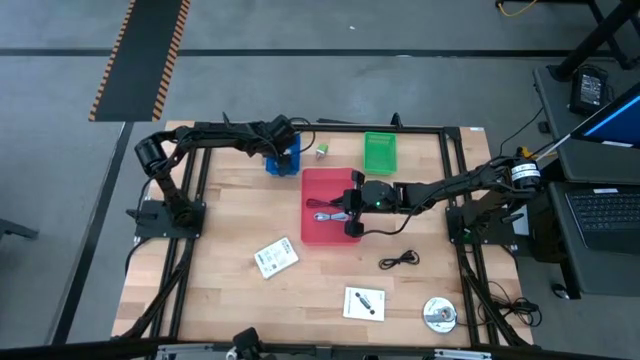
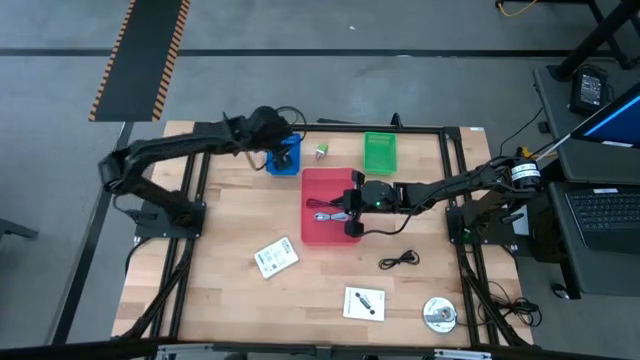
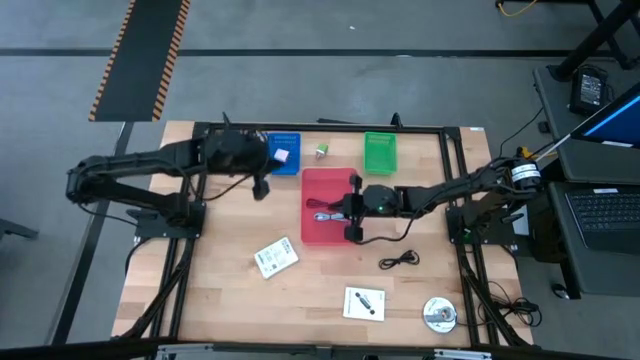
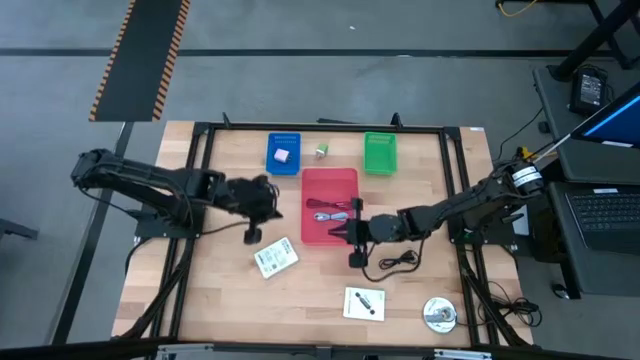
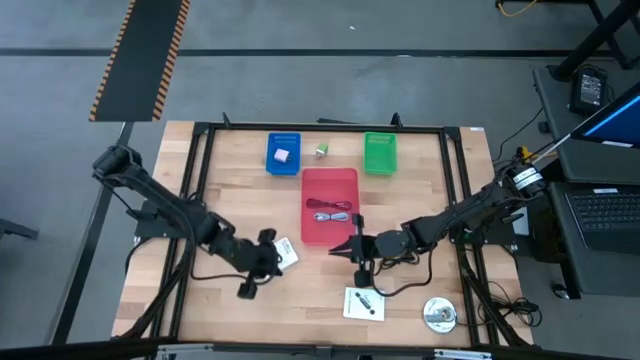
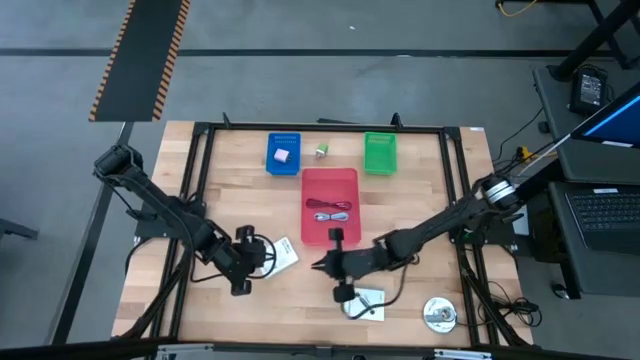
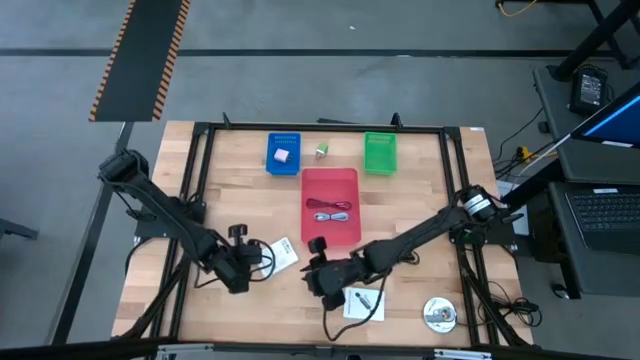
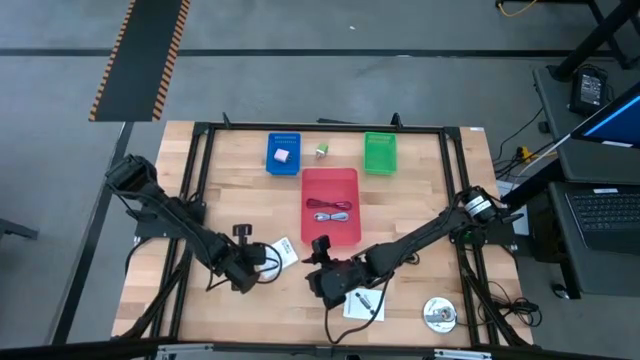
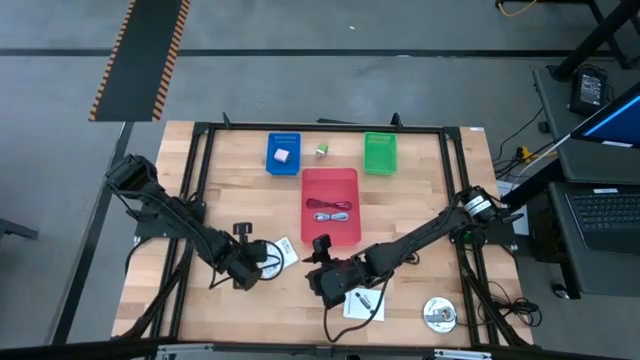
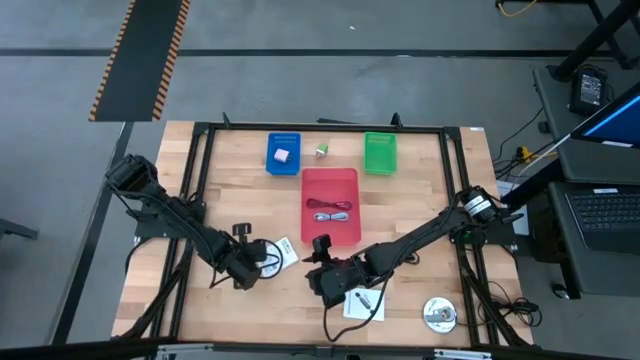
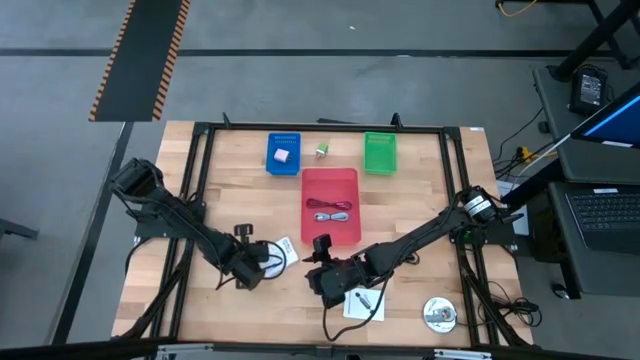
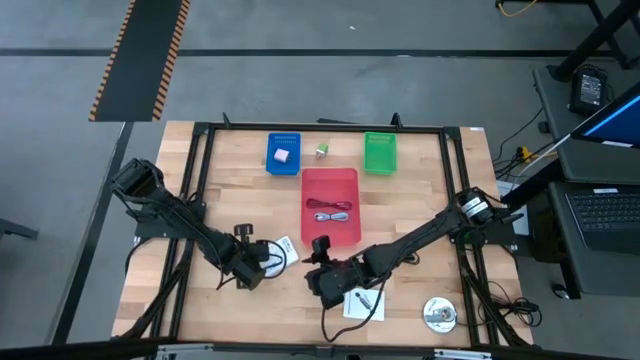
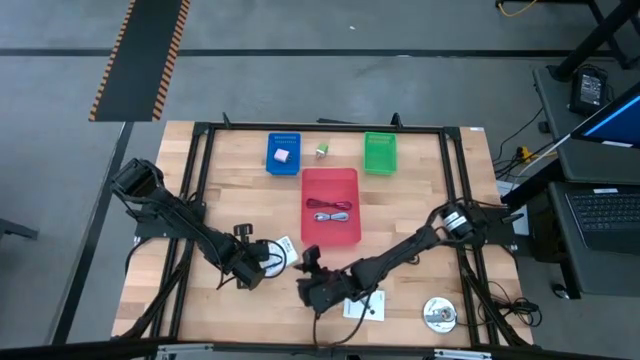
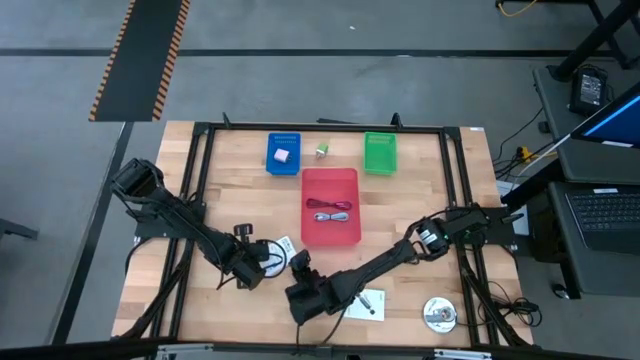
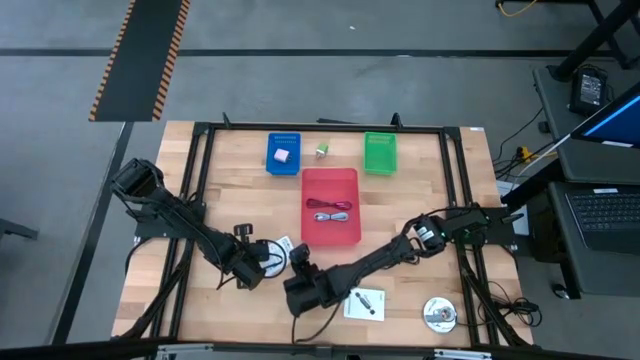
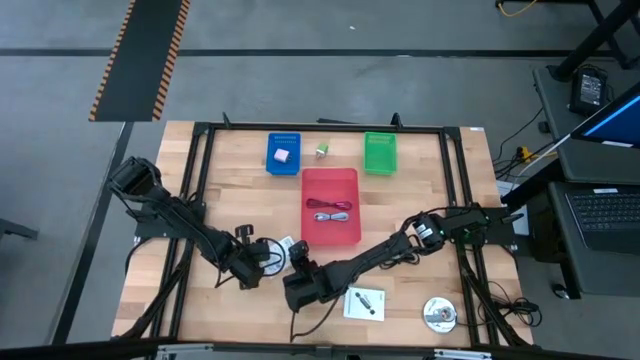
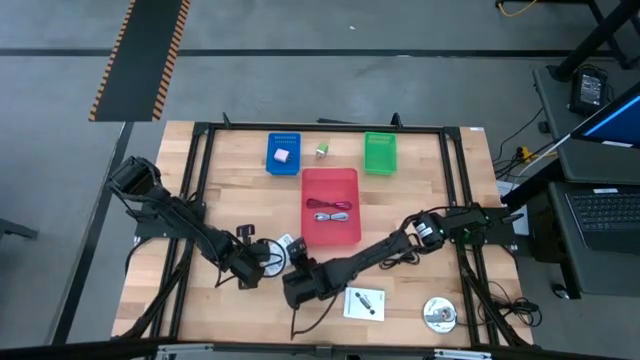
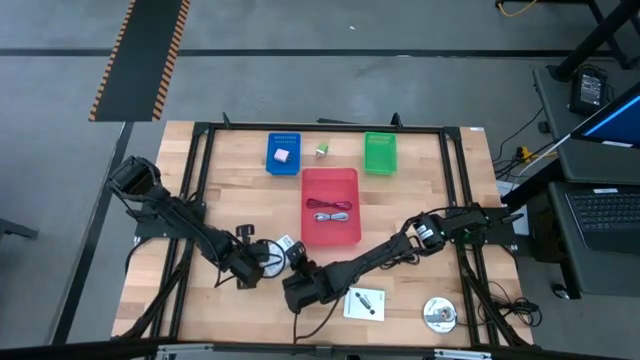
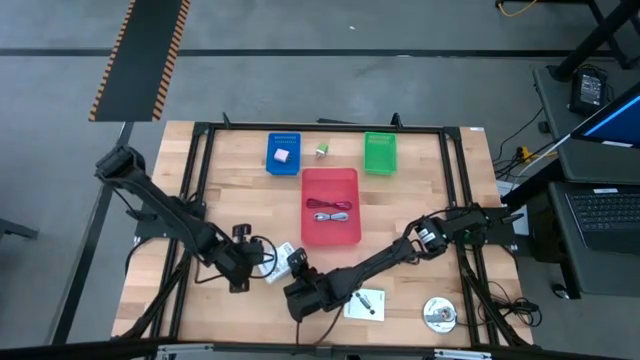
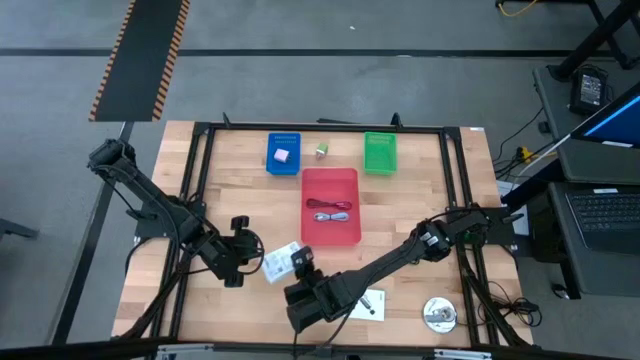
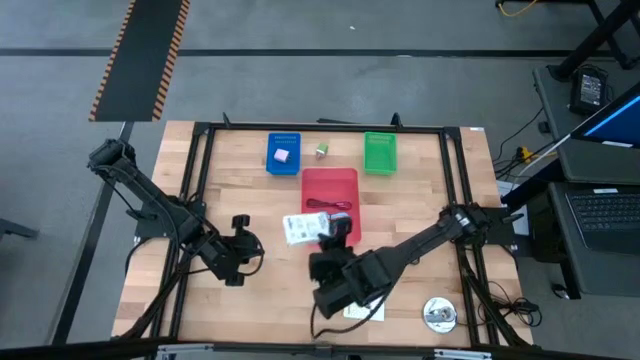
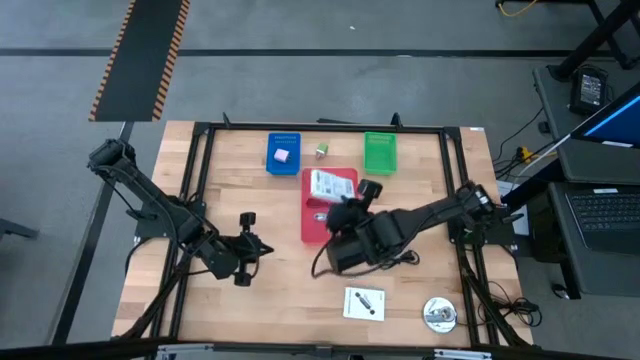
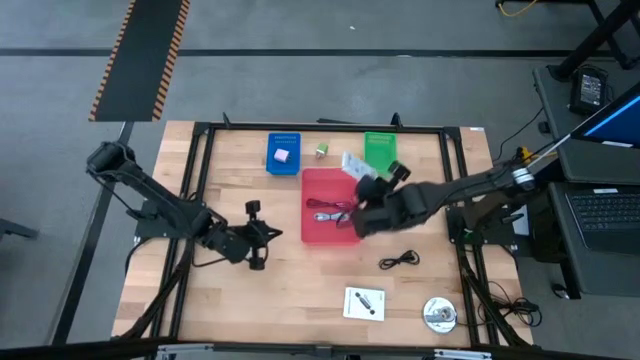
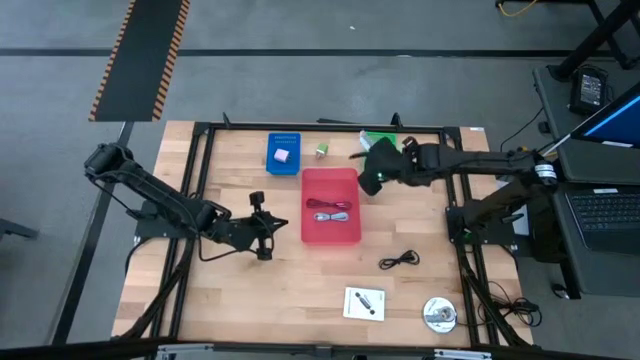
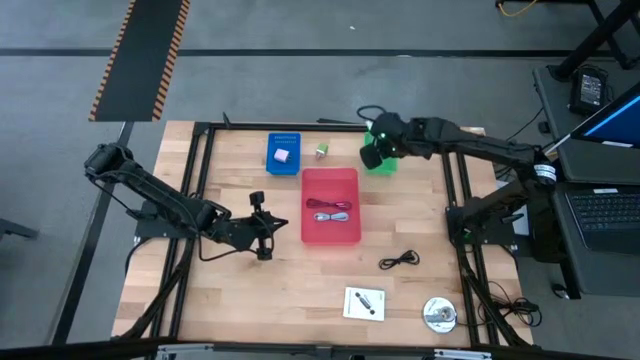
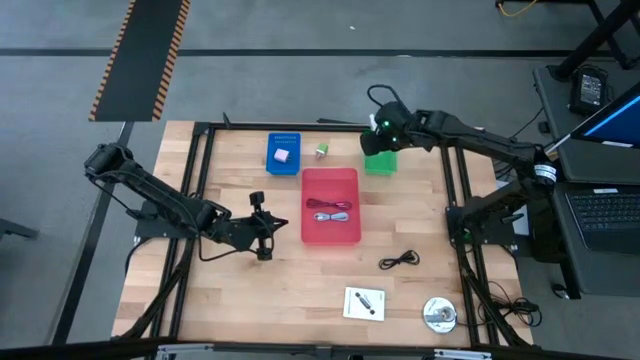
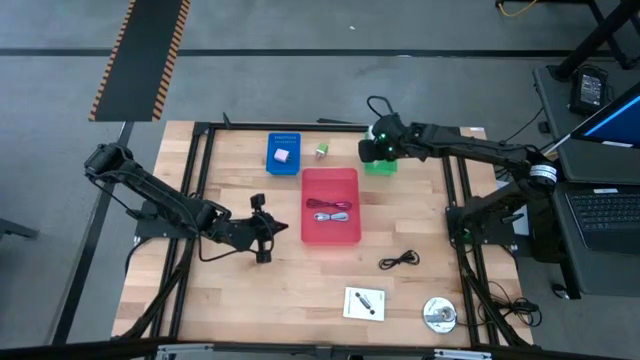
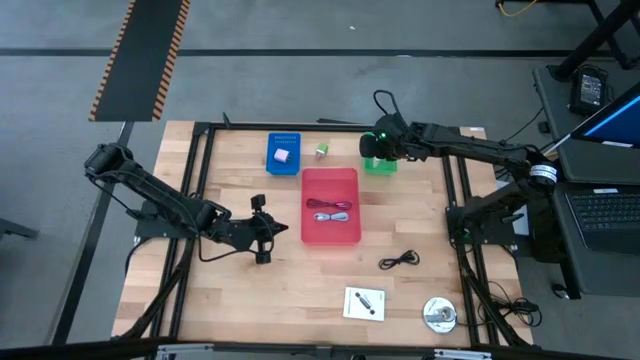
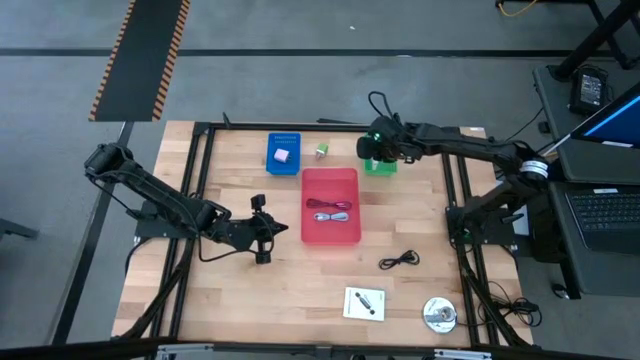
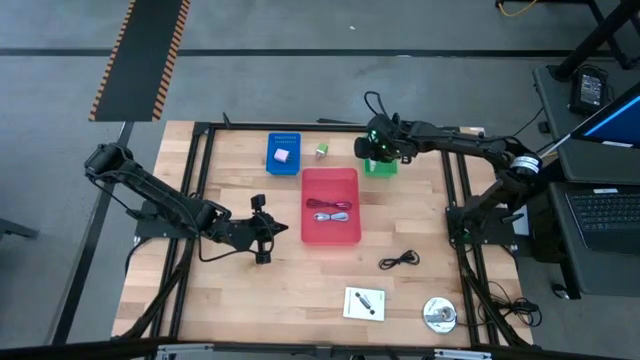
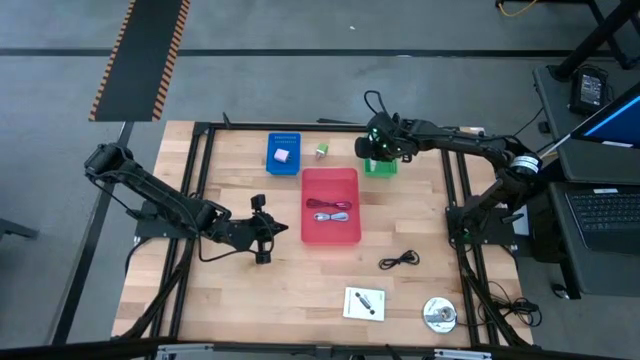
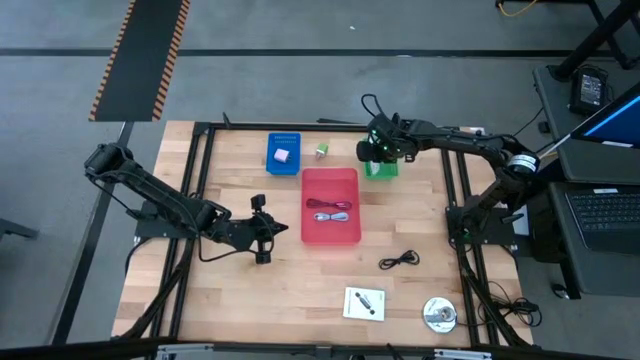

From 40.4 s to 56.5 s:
Task: Pick and place items into bin
Put the left card reader box into the green bin

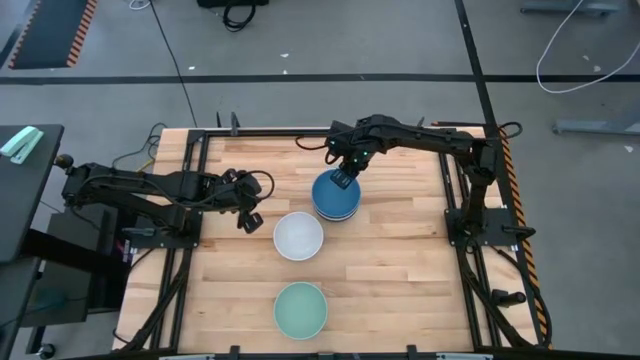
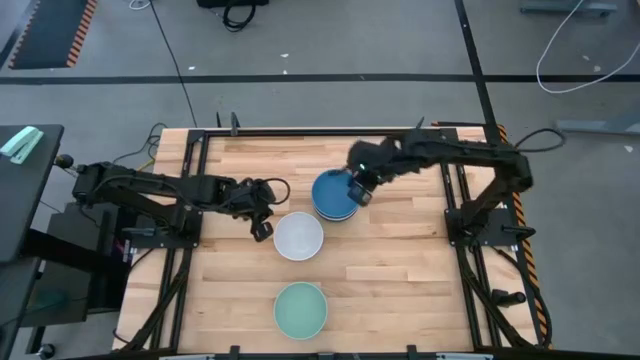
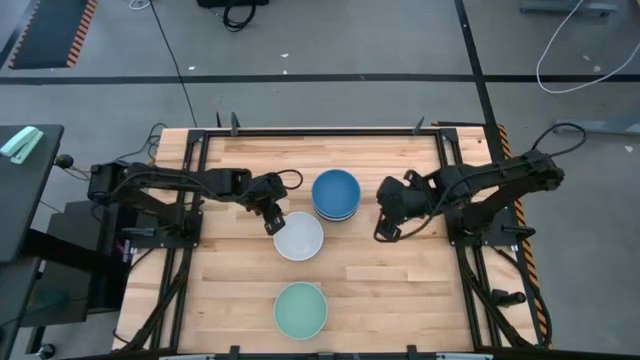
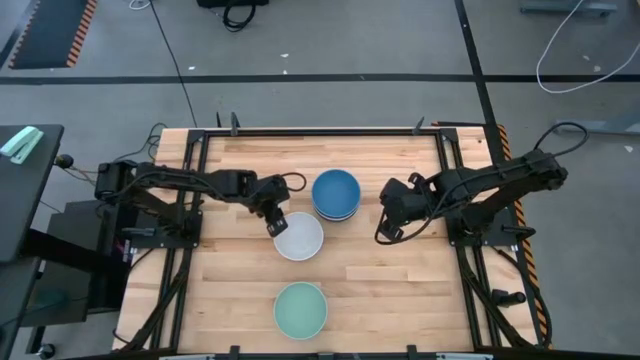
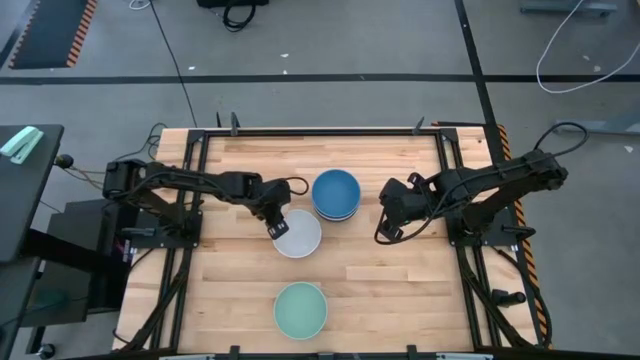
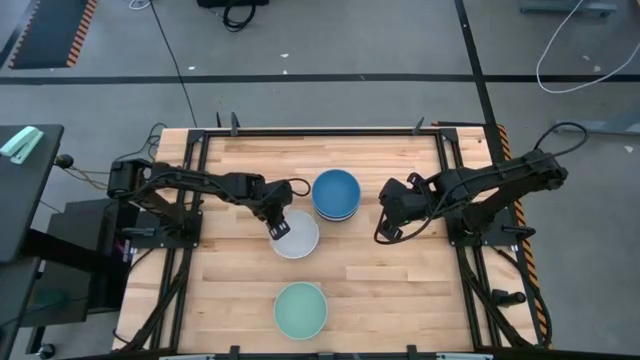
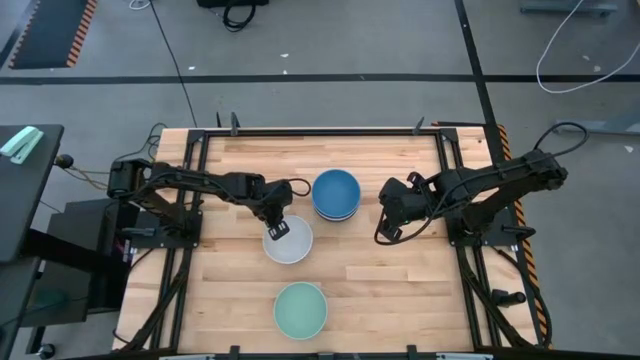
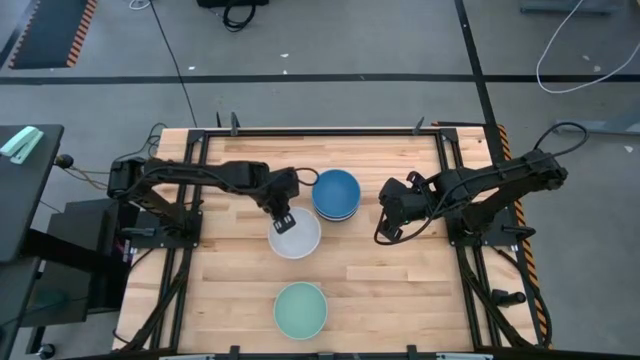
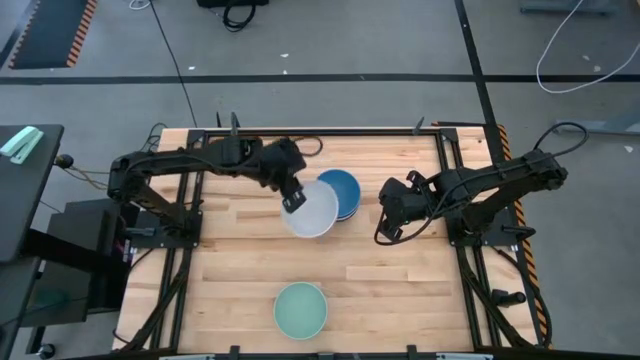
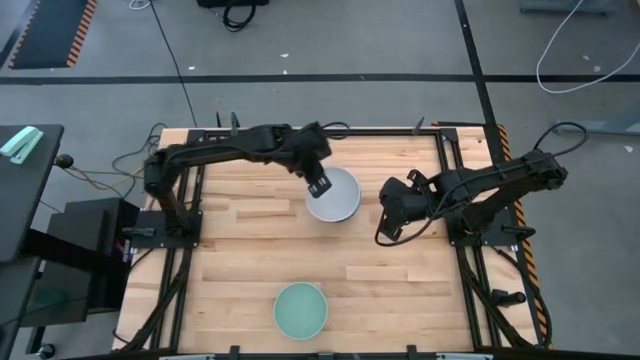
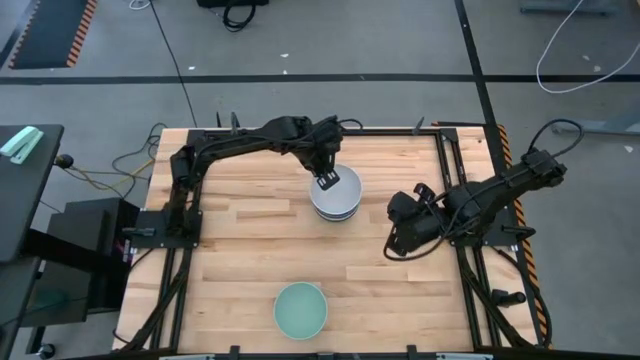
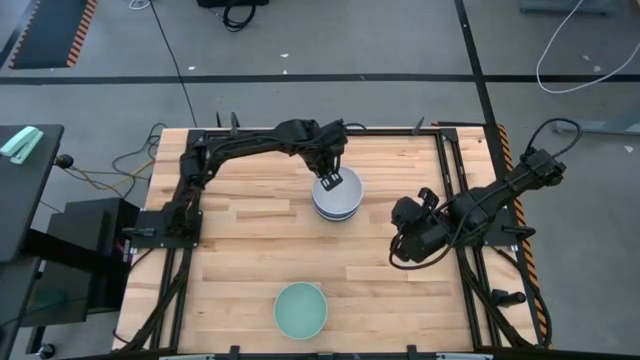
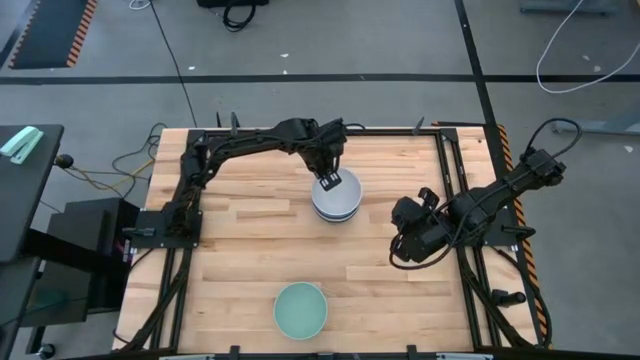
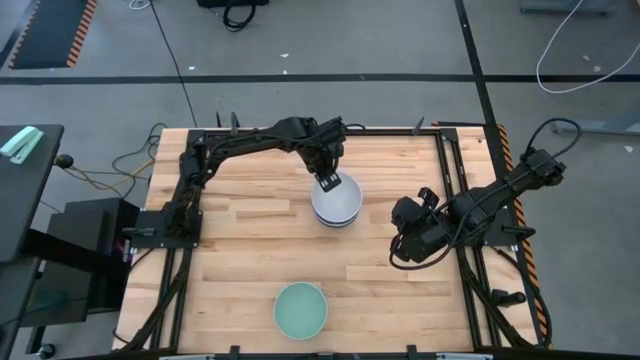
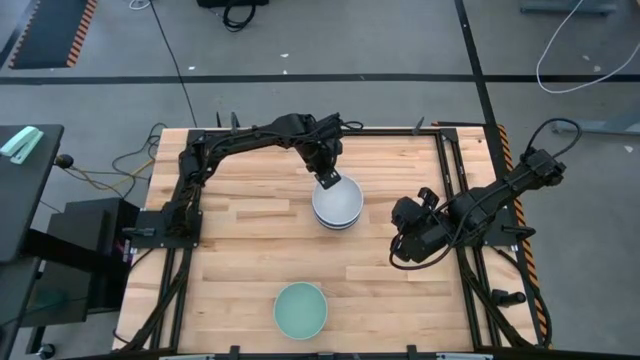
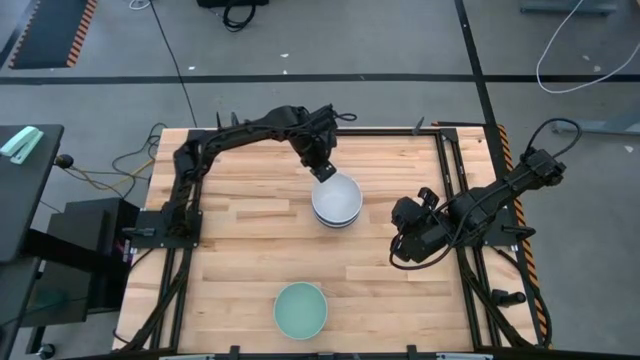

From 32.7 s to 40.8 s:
Task: Nest bowls inside each other
Stack the white bowl on the blue bowl
